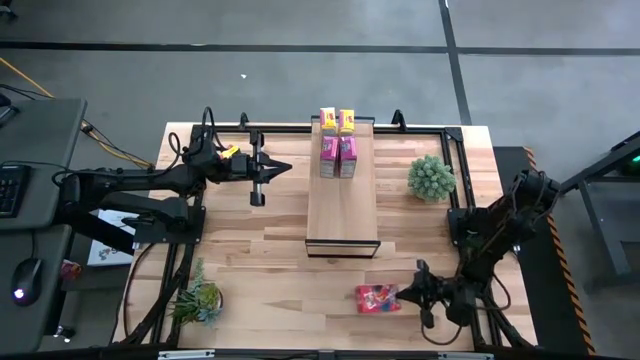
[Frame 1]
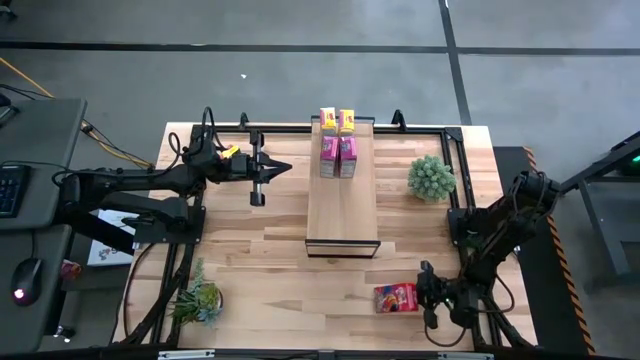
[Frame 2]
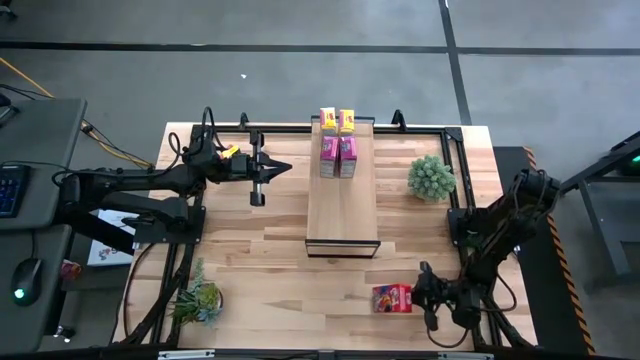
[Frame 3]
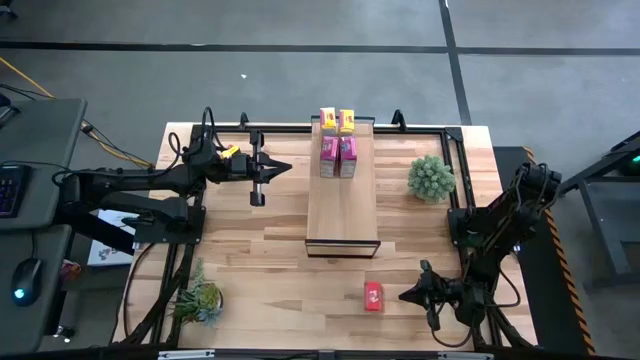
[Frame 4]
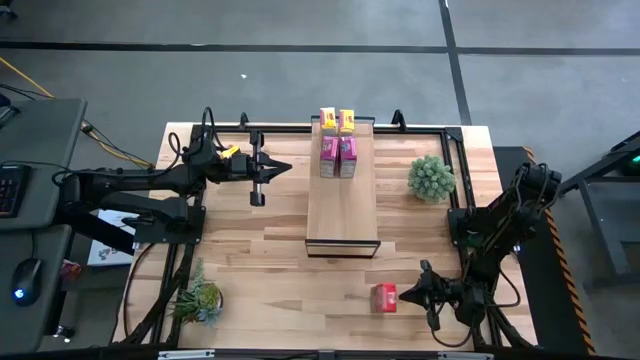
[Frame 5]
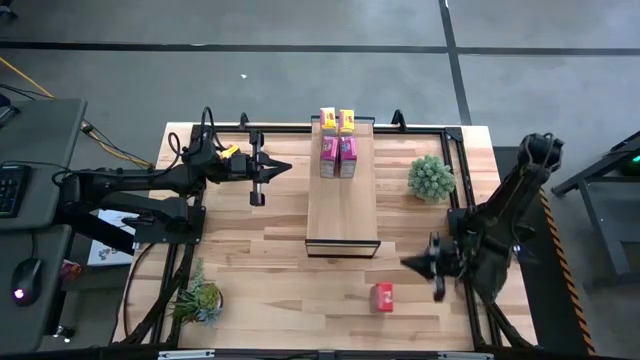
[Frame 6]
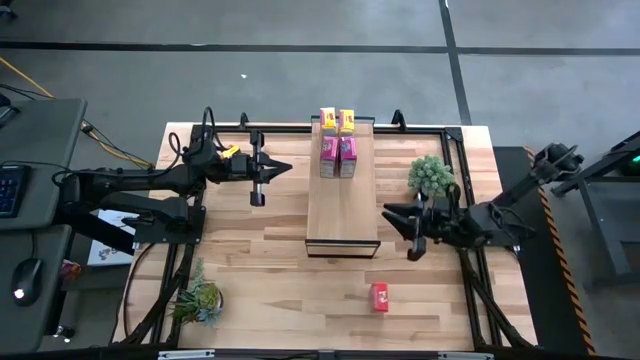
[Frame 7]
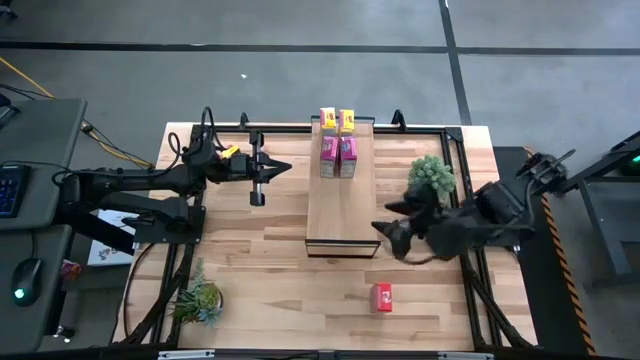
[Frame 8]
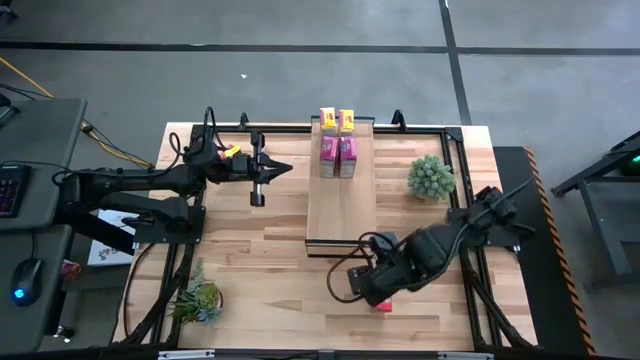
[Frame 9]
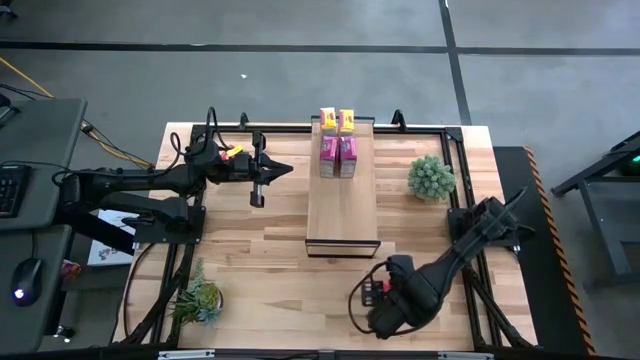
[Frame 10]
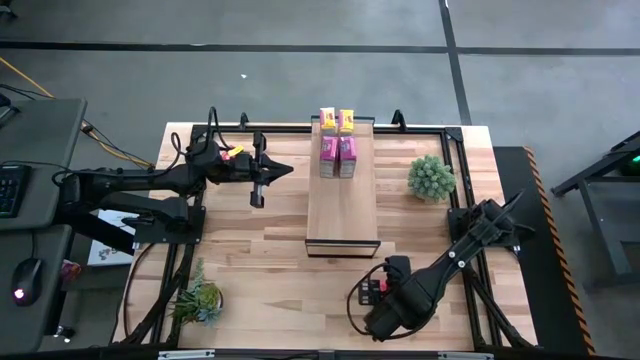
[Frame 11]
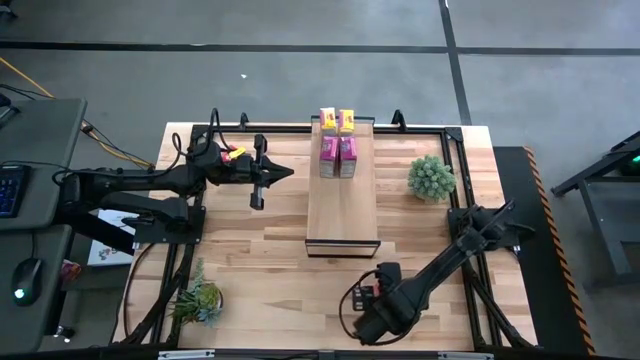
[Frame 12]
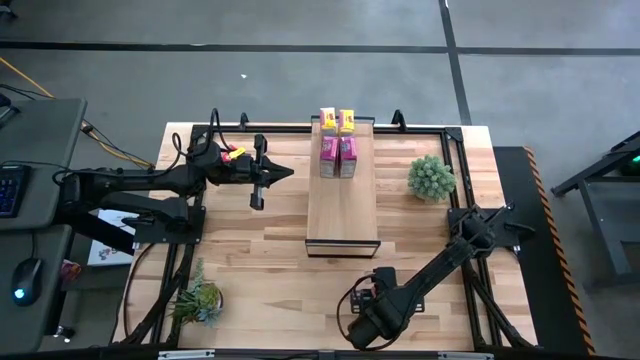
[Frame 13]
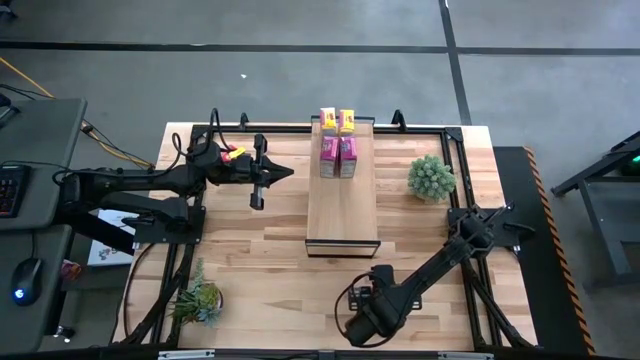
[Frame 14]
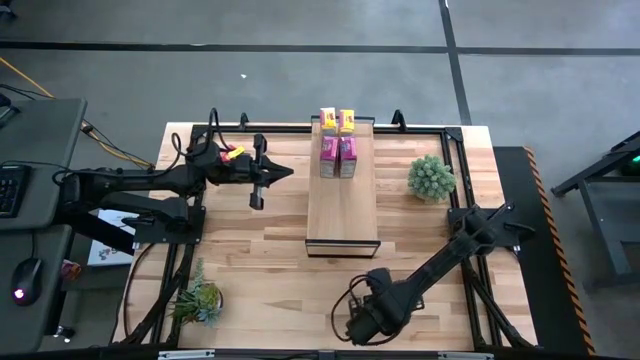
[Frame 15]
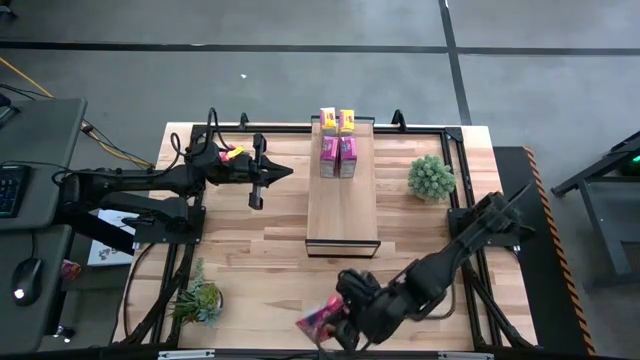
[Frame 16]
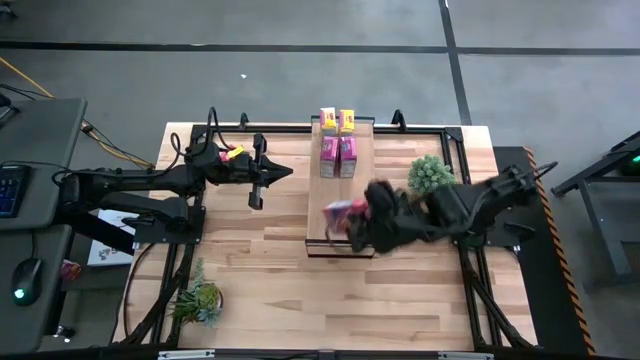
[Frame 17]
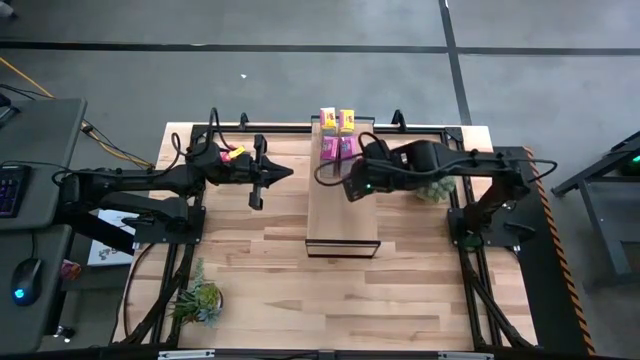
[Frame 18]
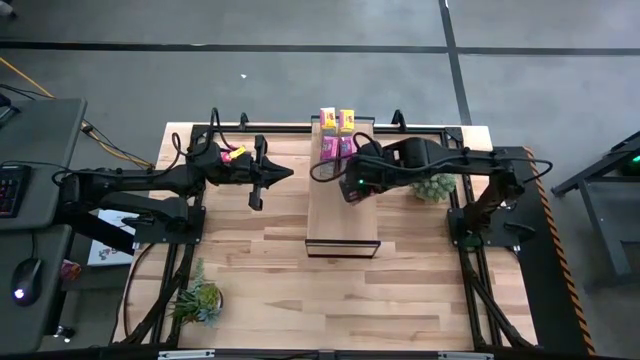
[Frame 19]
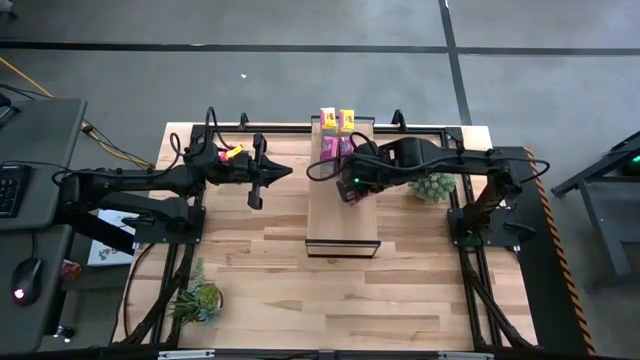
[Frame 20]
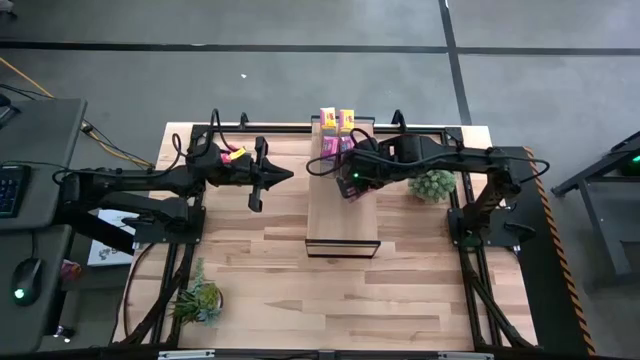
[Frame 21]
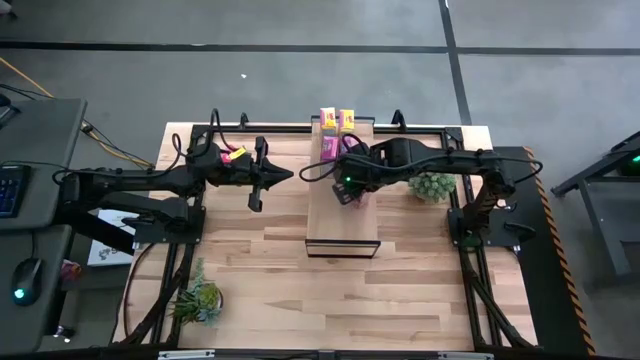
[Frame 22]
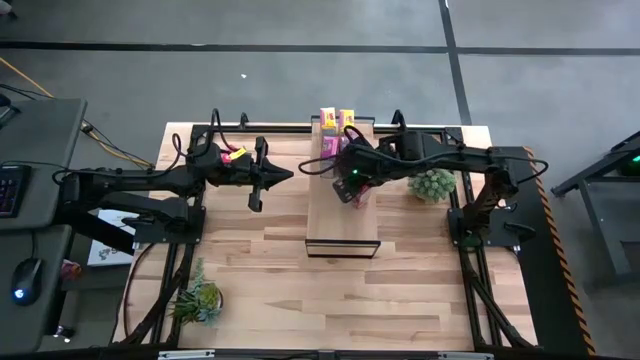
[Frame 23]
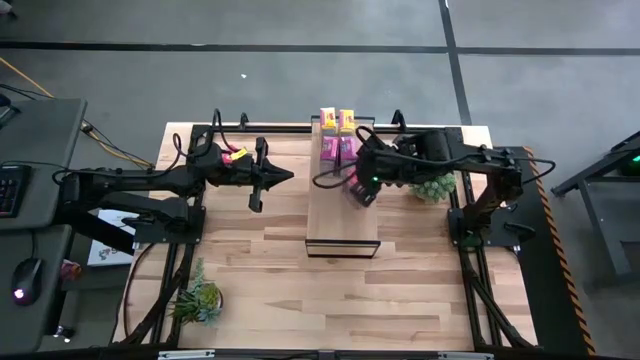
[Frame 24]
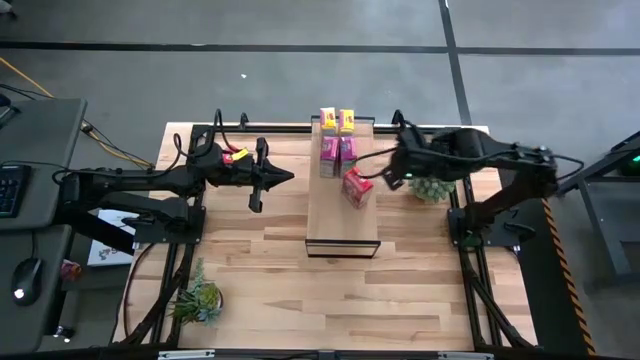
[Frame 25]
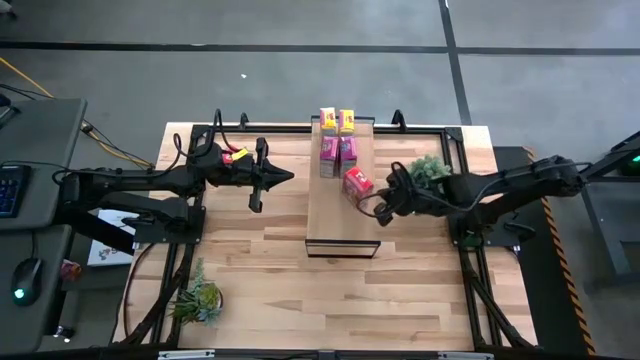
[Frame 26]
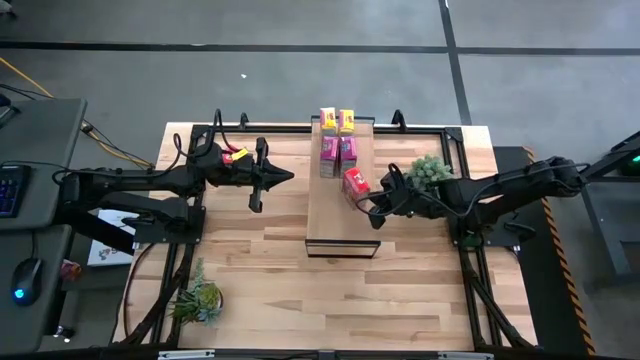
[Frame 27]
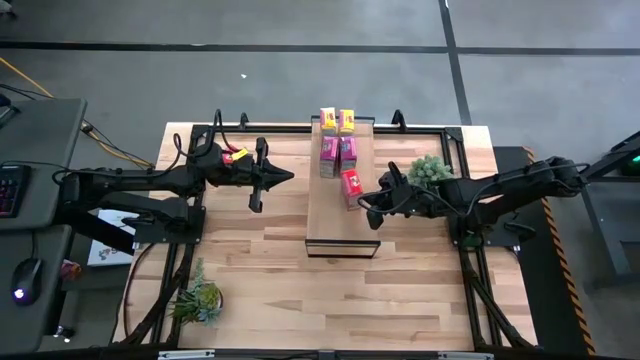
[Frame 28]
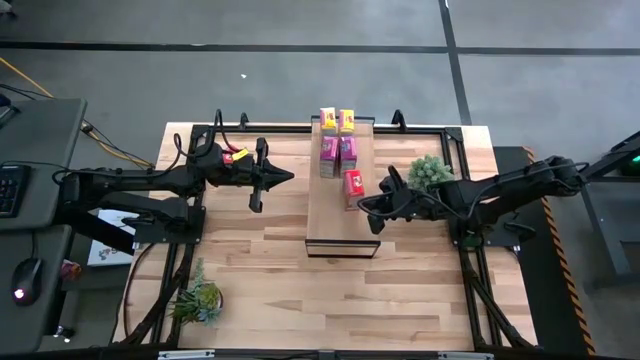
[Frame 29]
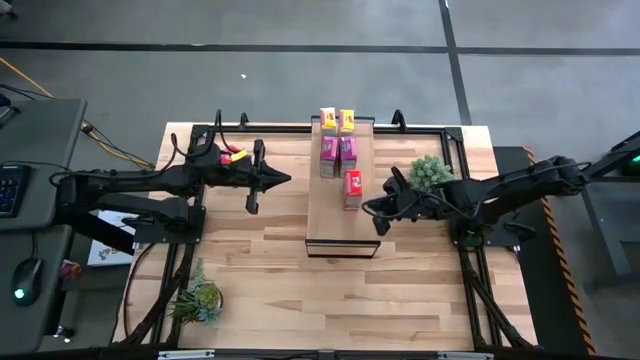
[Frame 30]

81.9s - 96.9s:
Task: Stack cereal on shelf
Put the bottom red cereal box on the shelf

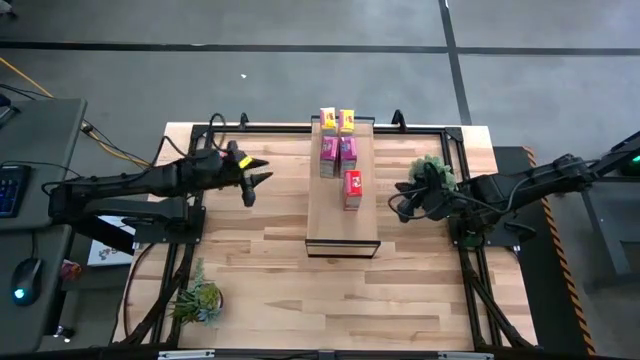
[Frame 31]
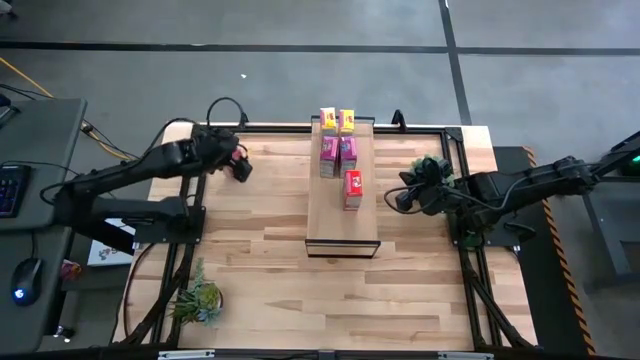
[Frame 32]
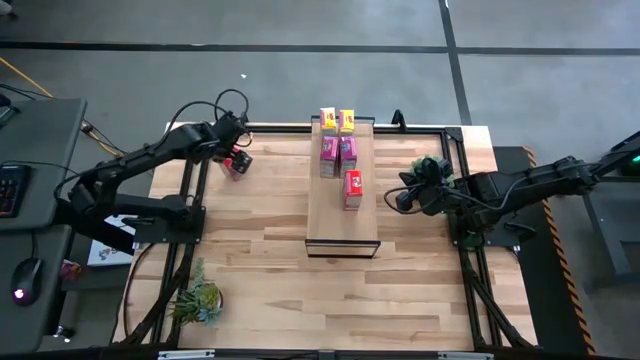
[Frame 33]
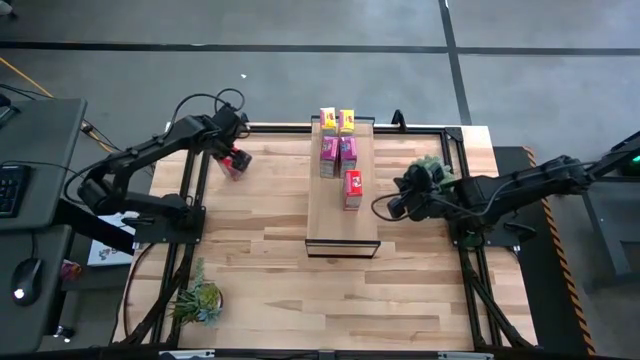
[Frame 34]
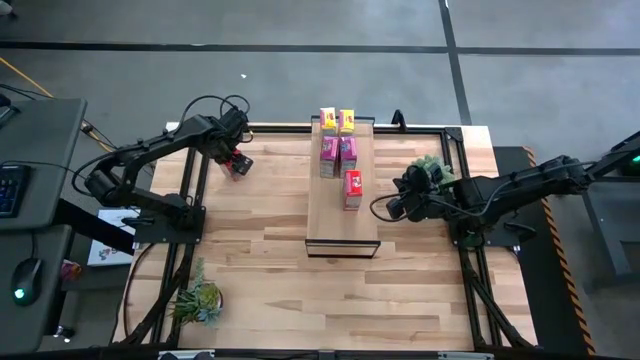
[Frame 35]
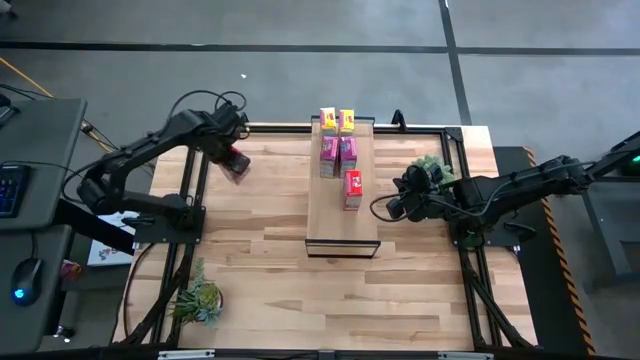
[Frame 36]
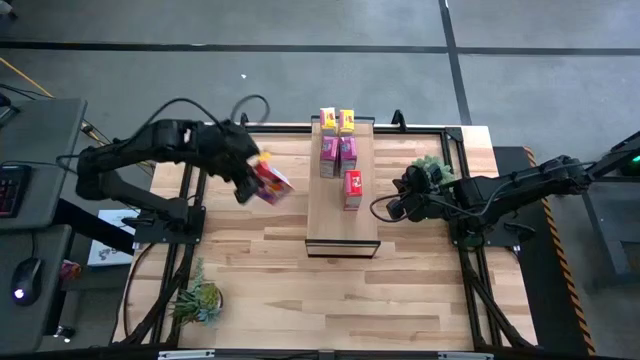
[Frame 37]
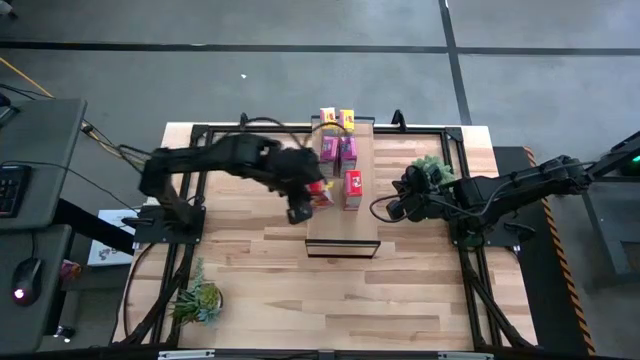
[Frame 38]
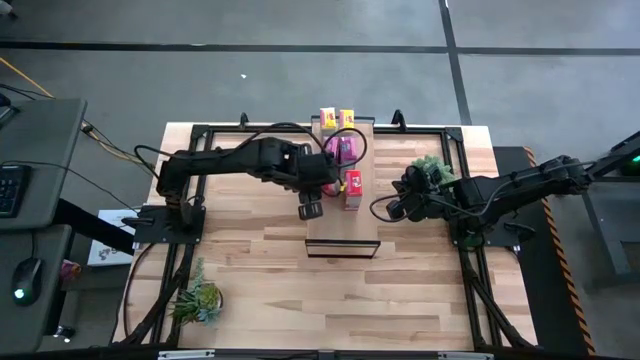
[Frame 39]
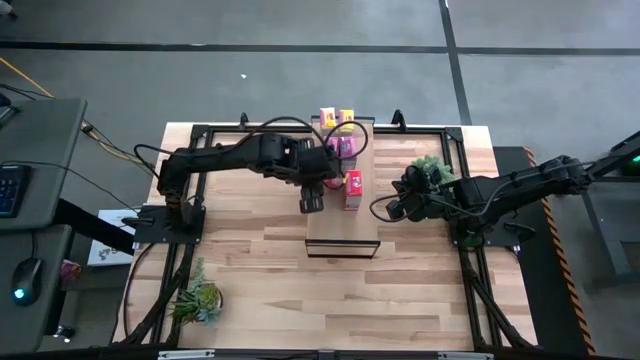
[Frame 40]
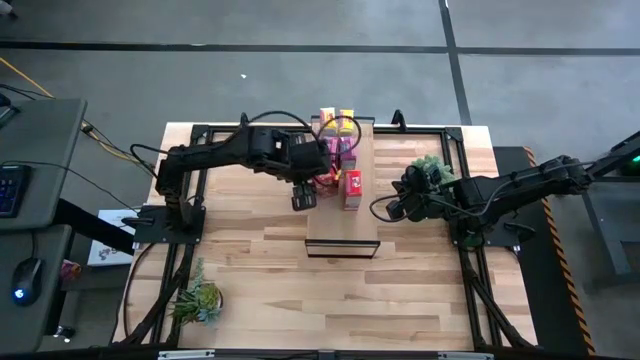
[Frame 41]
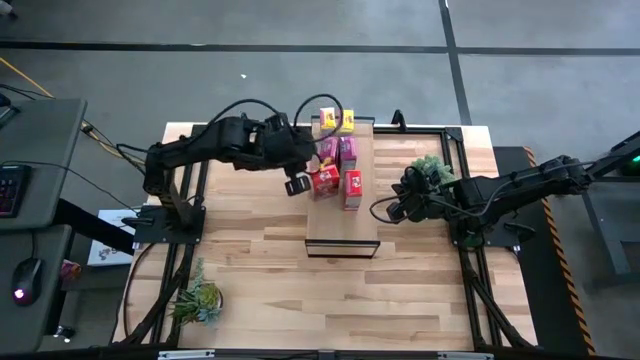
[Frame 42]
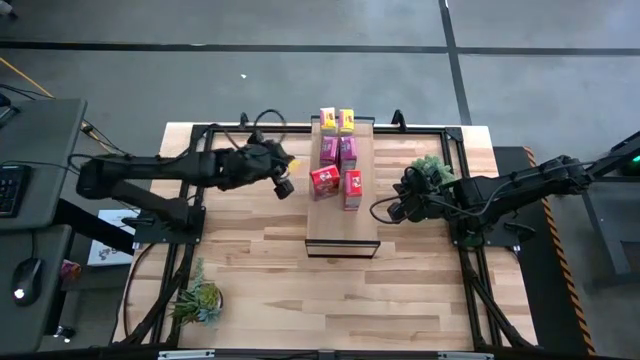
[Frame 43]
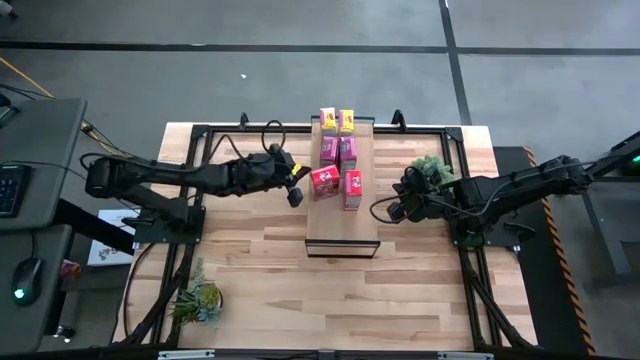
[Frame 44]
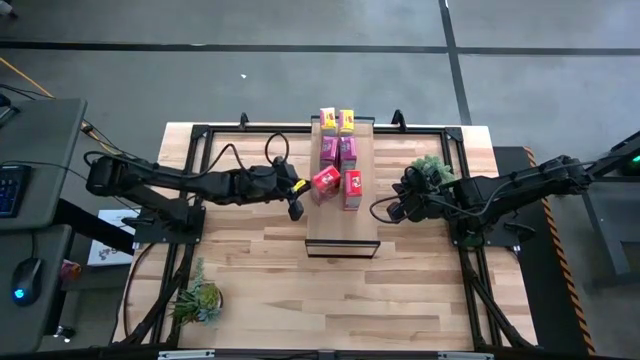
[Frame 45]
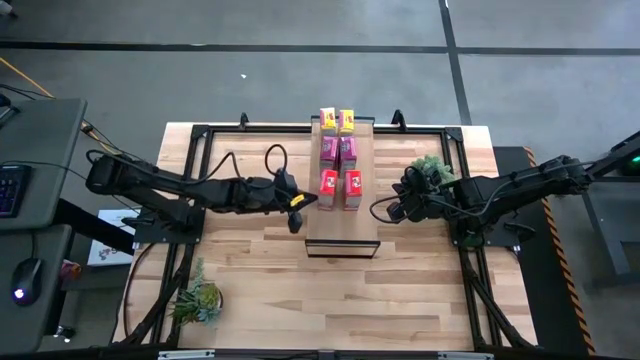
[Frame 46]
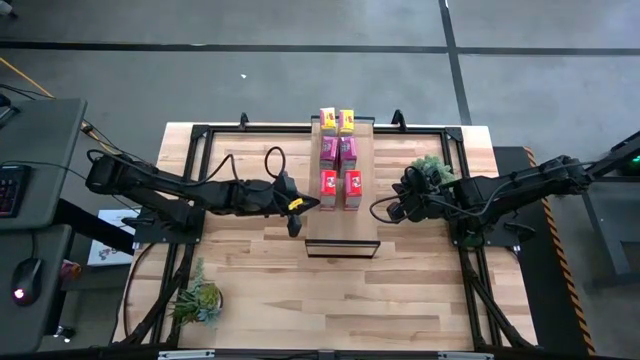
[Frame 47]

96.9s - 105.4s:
Put the red cereal box on the shelf
